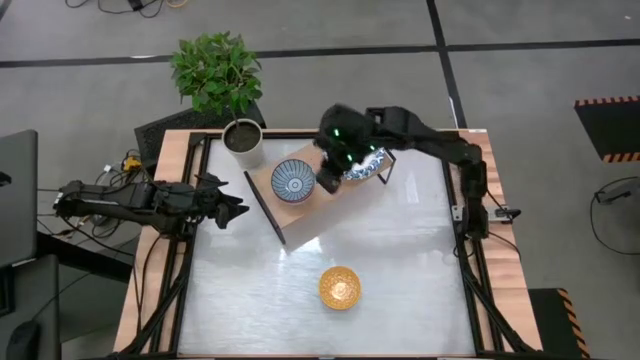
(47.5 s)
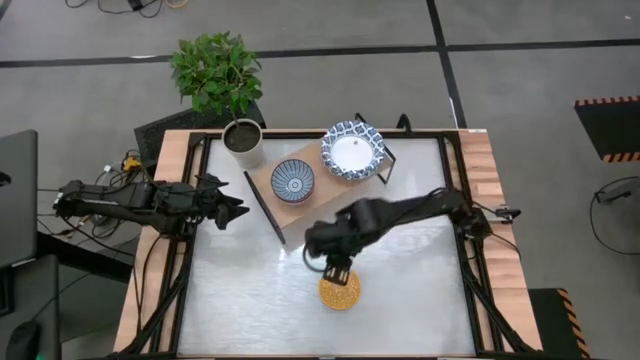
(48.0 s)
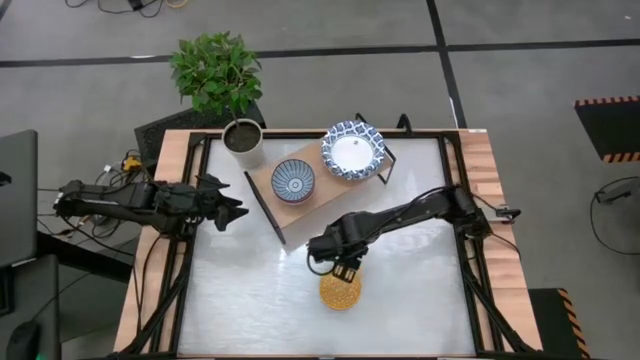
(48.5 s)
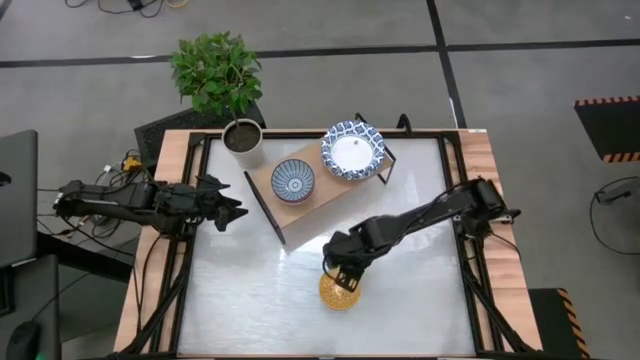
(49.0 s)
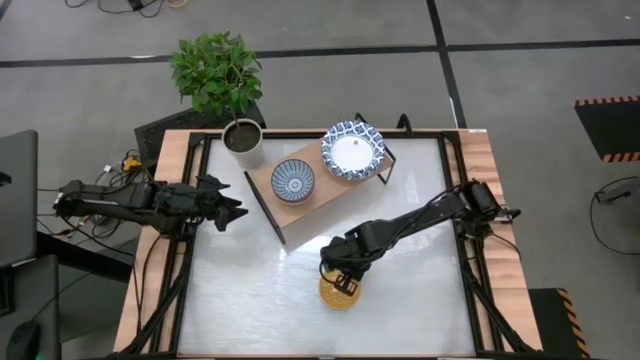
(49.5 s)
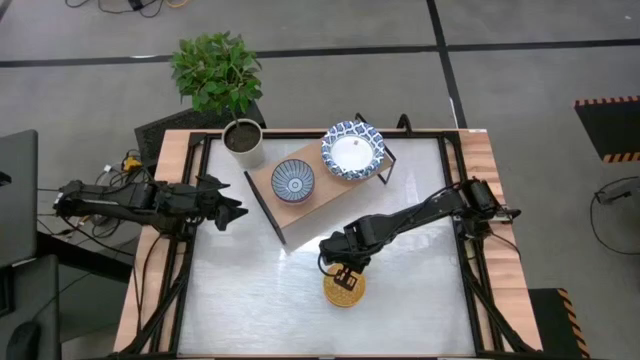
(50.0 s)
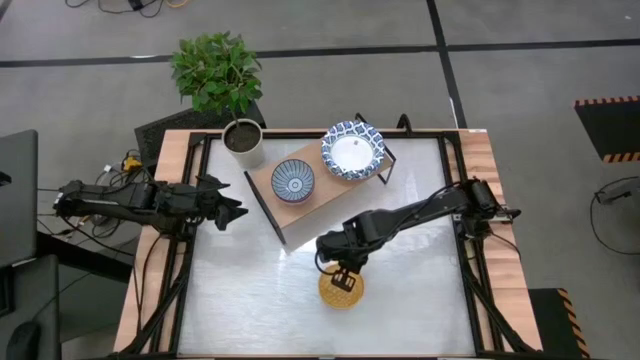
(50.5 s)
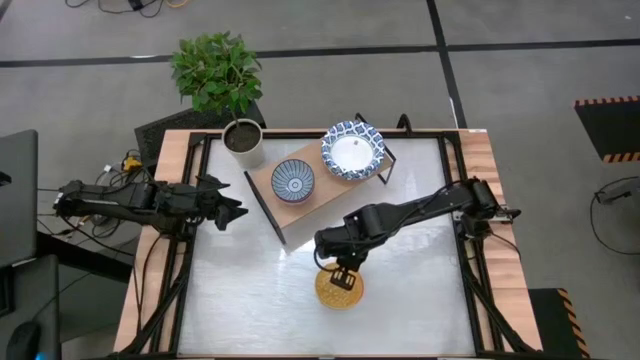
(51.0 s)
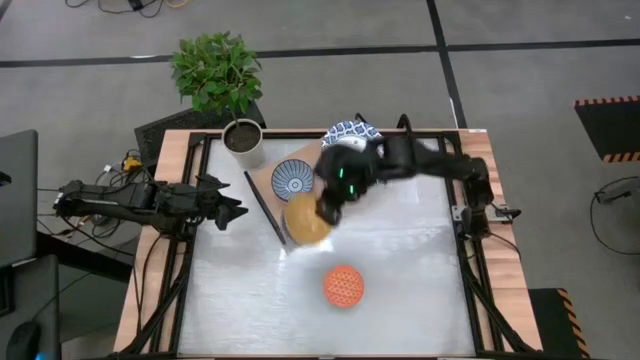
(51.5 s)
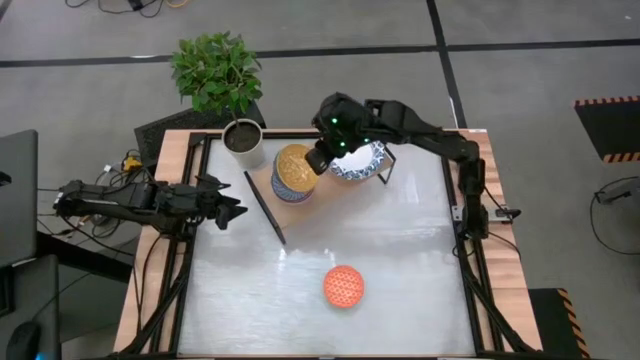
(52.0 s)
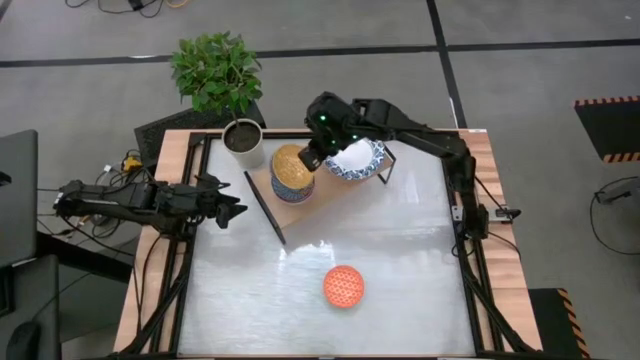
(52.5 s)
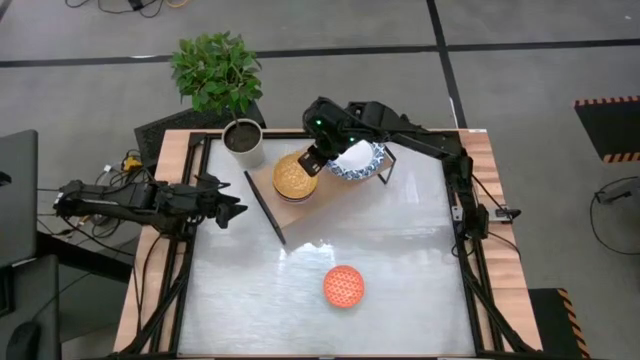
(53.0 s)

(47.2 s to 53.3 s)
Task: Place and stack bowls onto a shelf
Stack the yellow bowl on top of the dark blue bowl on the shelf

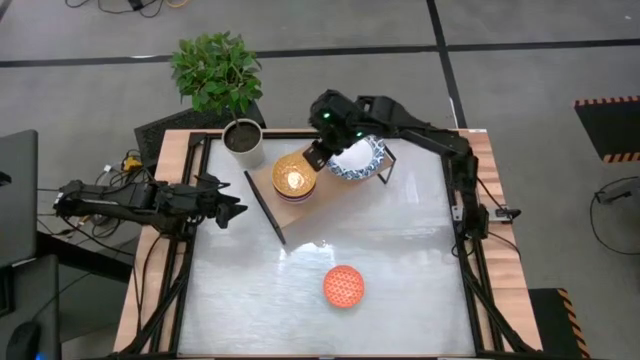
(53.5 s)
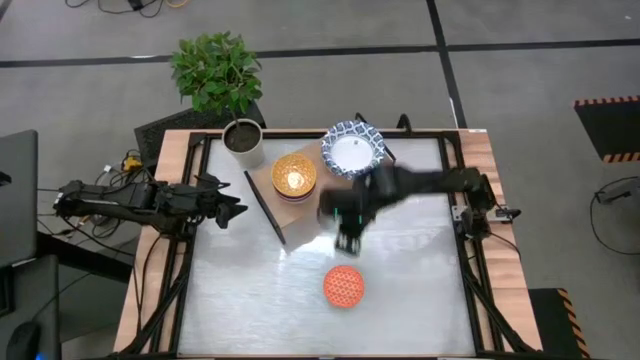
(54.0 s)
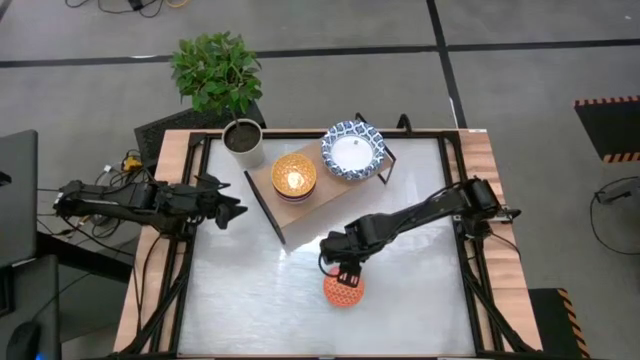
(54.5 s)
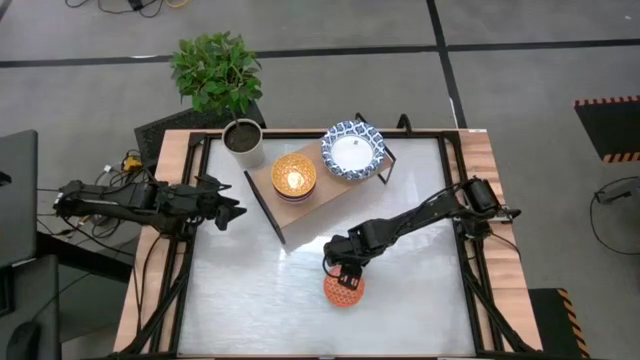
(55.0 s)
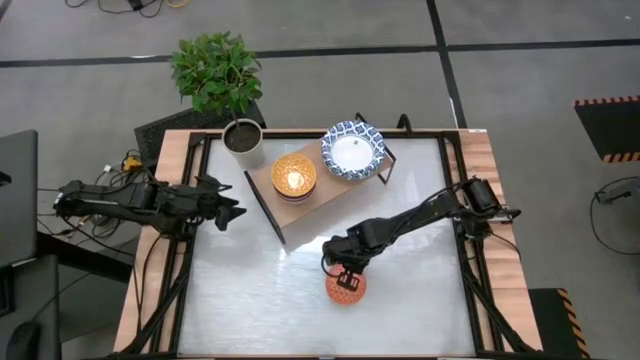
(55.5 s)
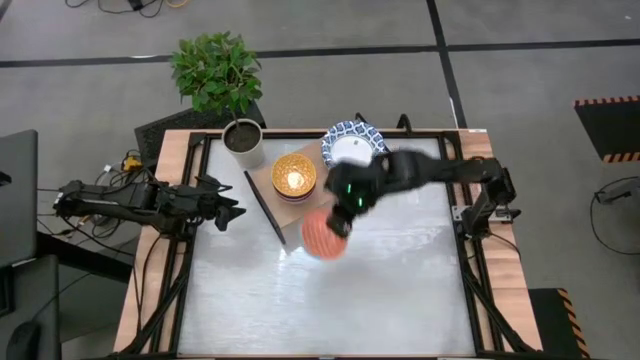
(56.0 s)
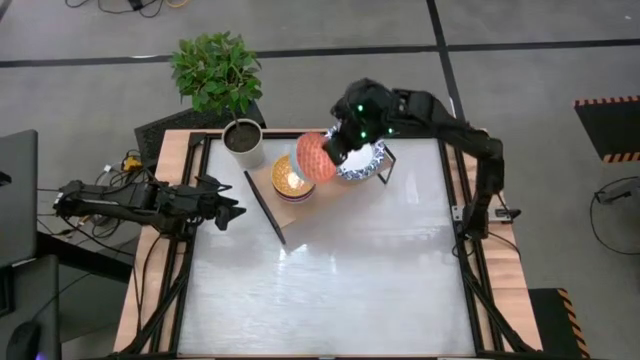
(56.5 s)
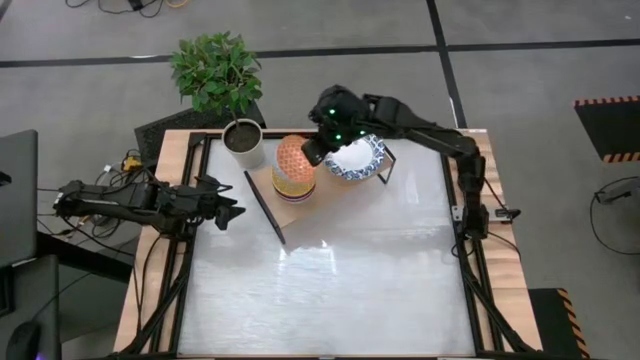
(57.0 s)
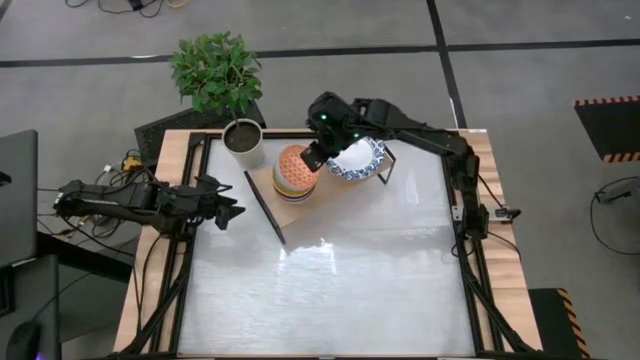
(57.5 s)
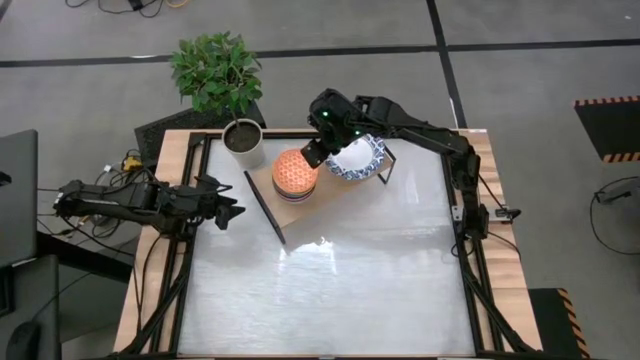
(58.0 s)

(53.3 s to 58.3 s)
Stack the orange bowl on top of the yellow bowl on the shelf

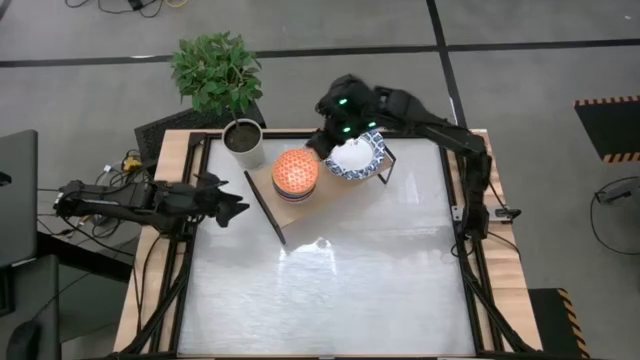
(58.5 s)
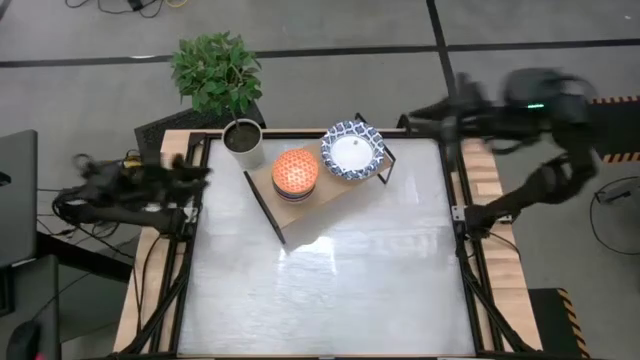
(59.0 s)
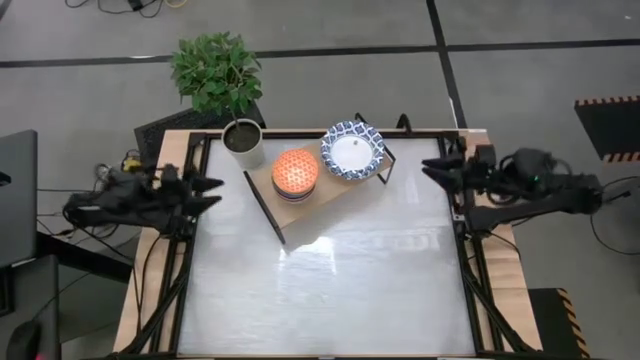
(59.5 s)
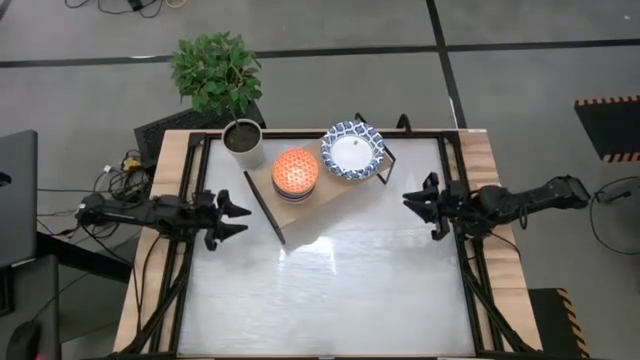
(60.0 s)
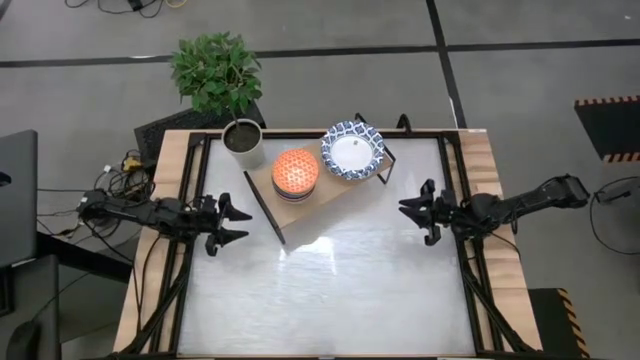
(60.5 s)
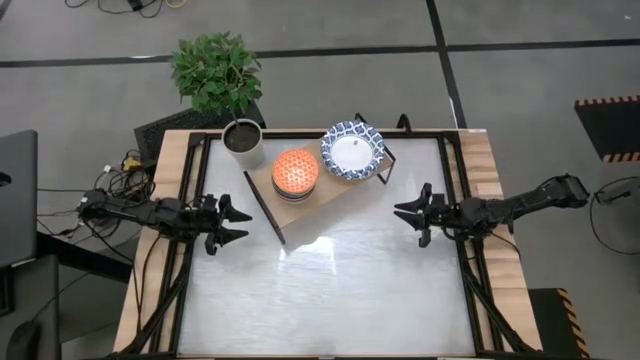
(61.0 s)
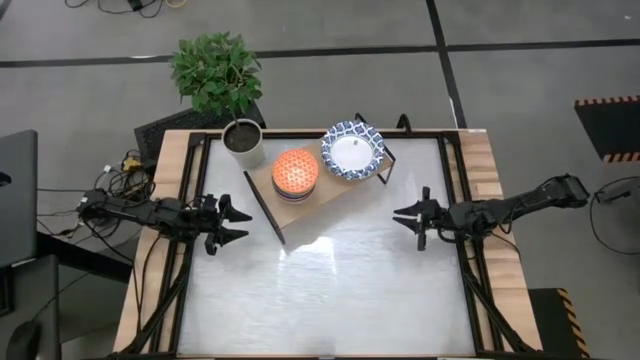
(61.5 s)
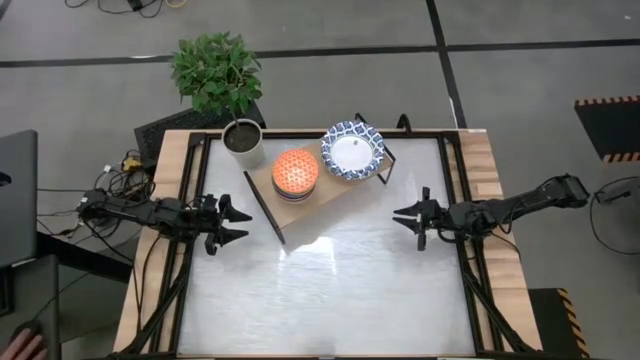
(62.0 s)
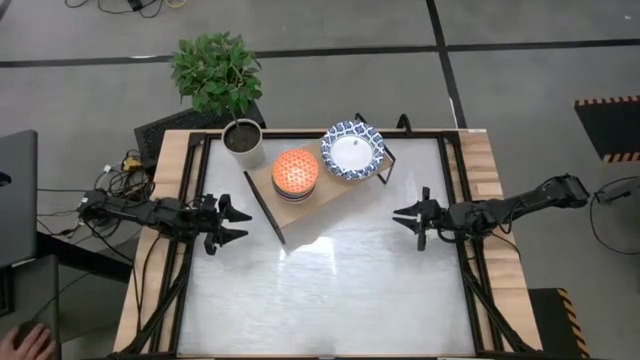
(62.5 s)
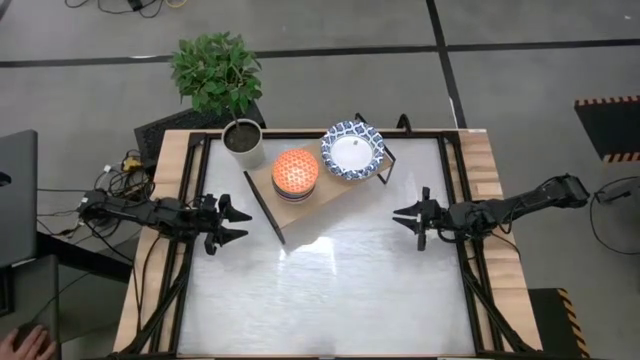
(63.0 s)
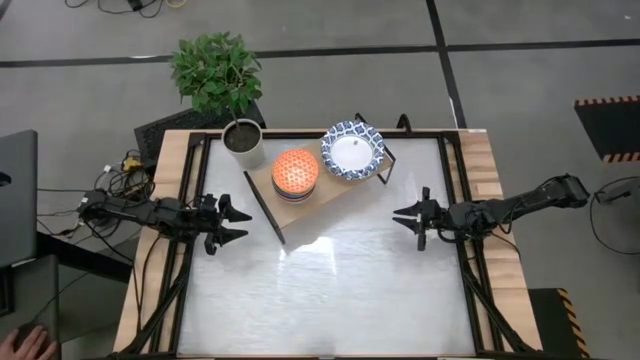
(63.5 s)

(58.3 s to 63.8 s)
Return to Home Position

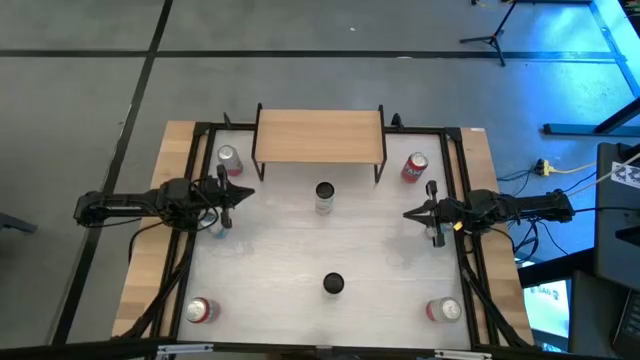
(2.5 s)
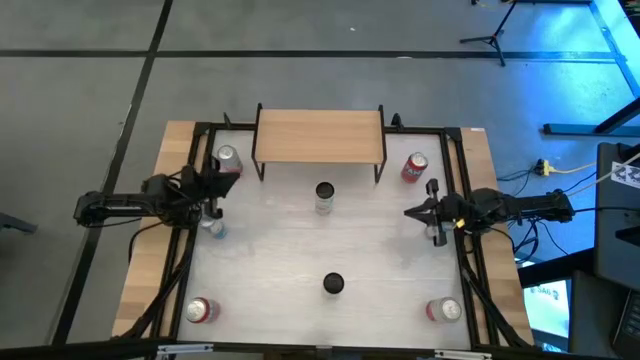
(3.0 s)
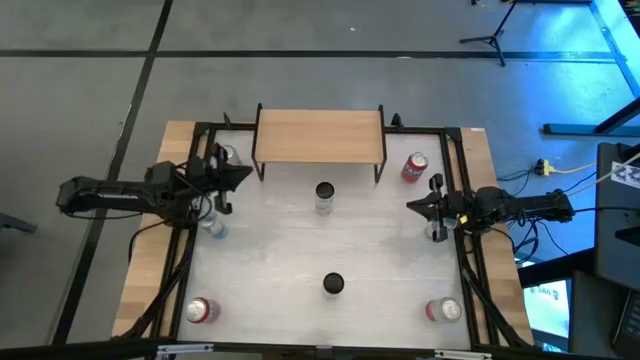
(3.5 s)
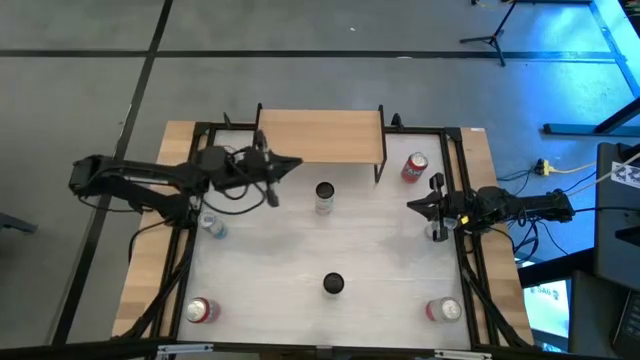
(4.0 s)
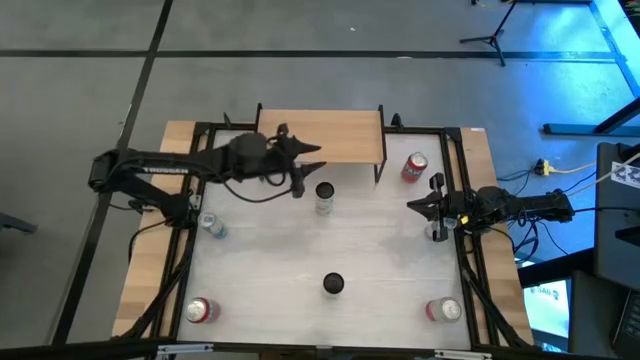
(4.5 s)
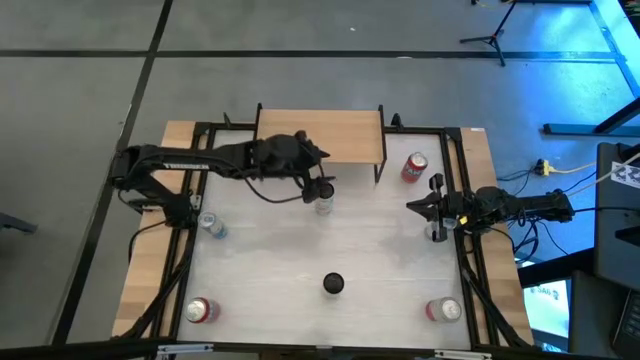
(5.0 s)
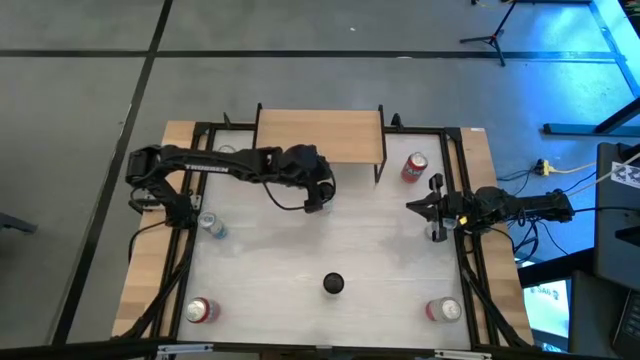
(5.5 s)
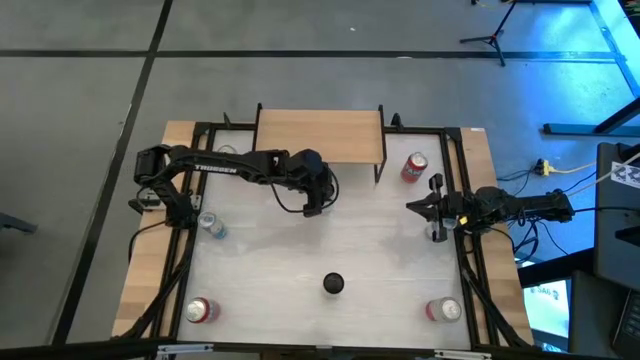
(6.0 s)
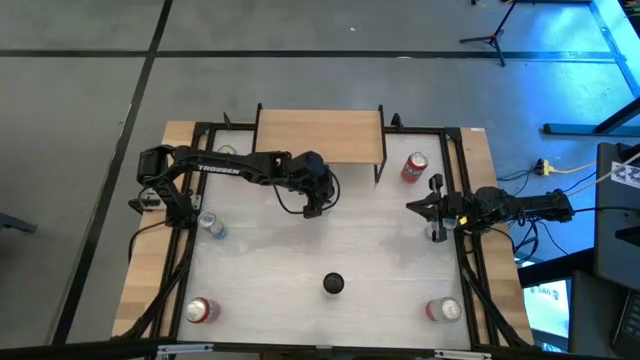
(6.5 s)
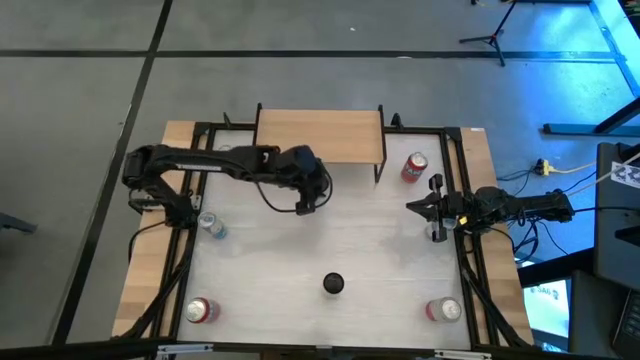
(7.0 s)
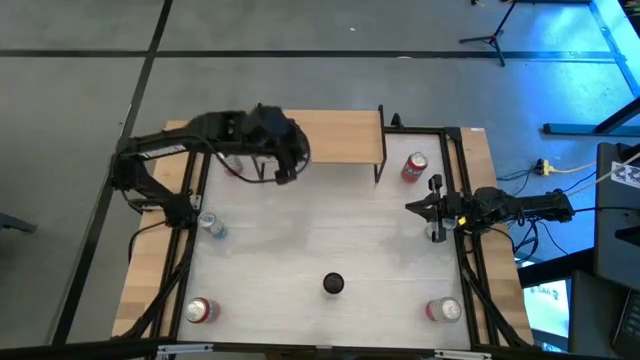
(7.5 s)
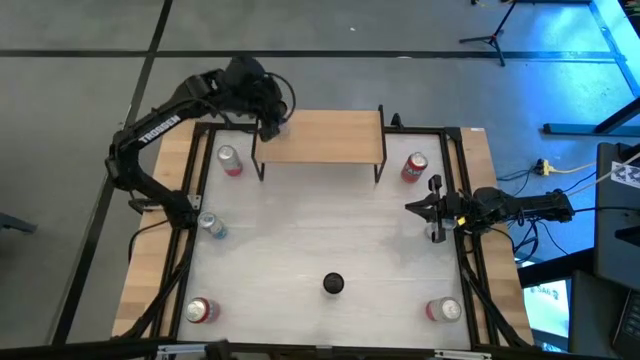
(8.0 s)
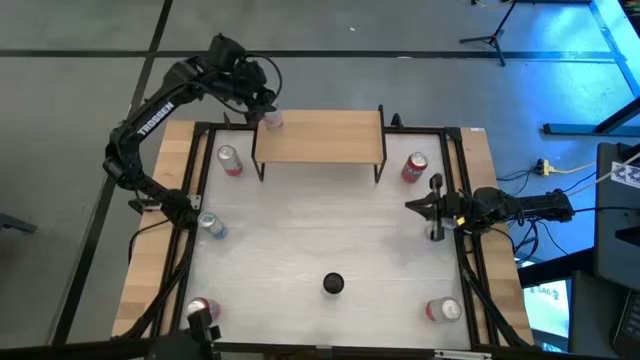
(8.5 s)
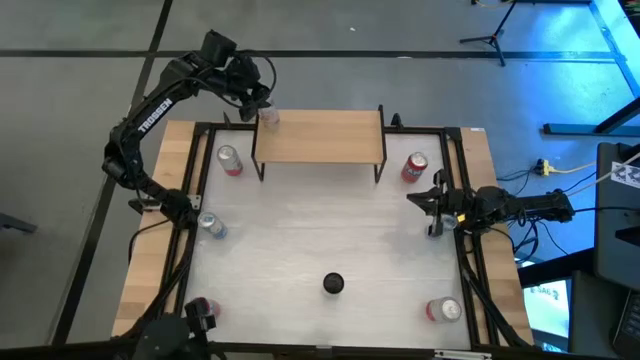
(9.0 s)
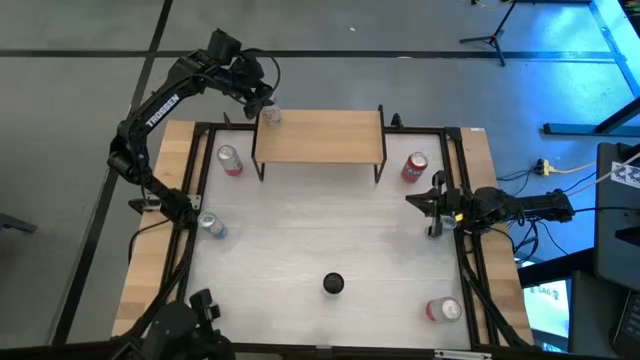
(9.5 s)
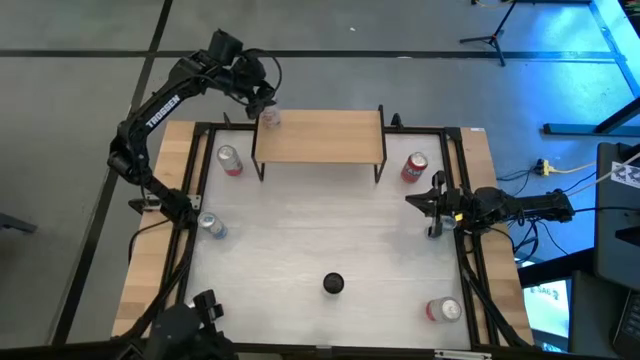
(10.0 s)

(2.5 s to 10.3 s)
Task: Place canned beverage on shelf
Put the top peach soda can on the shelf
